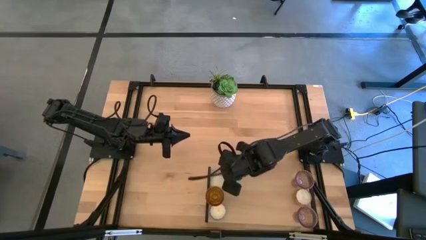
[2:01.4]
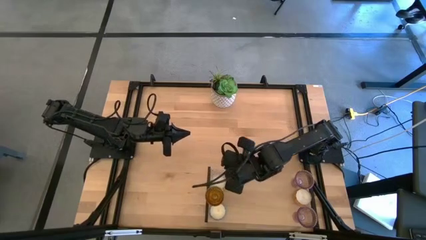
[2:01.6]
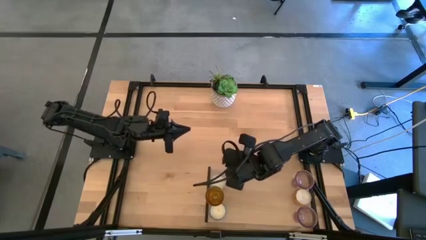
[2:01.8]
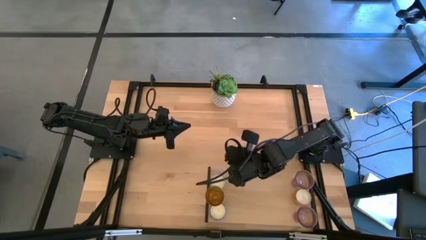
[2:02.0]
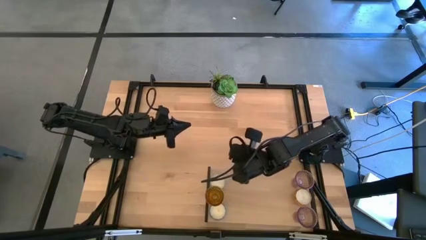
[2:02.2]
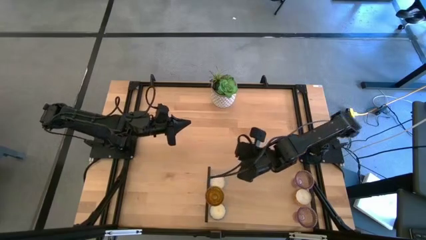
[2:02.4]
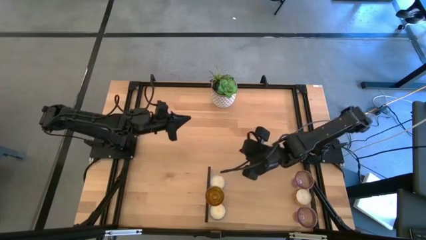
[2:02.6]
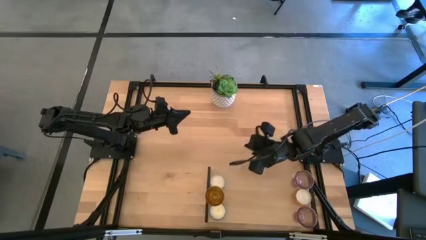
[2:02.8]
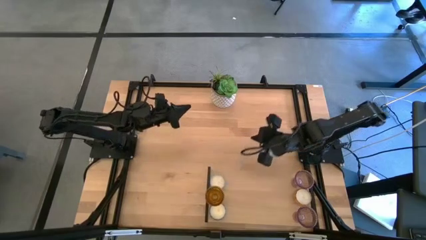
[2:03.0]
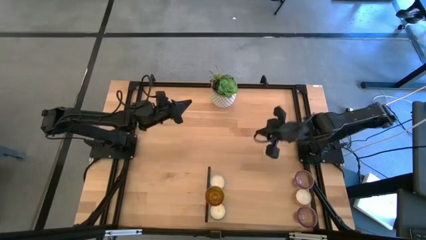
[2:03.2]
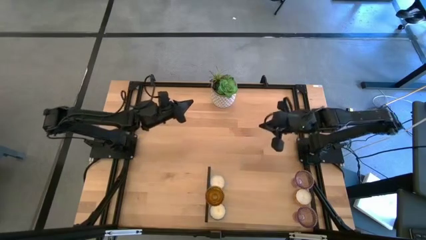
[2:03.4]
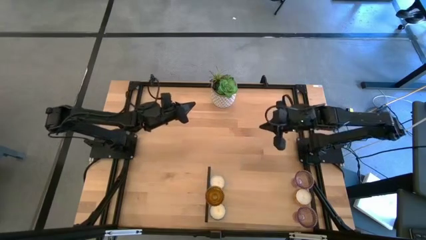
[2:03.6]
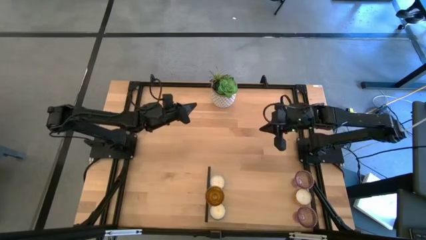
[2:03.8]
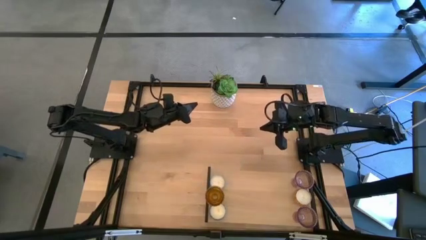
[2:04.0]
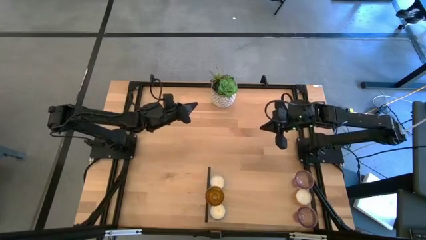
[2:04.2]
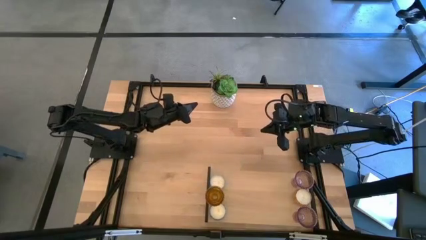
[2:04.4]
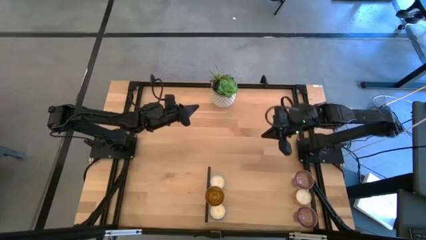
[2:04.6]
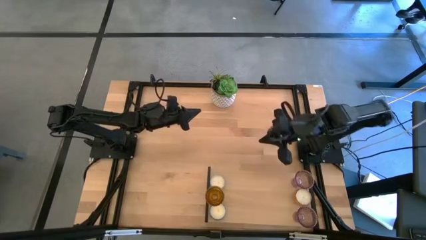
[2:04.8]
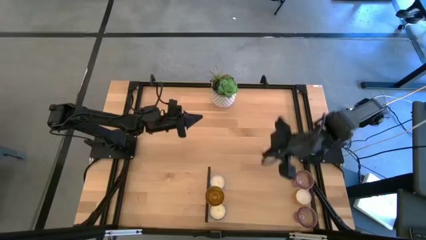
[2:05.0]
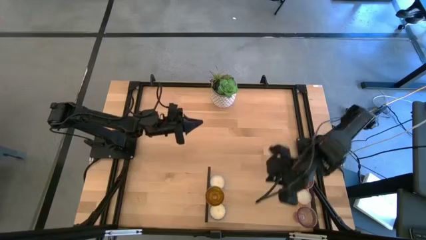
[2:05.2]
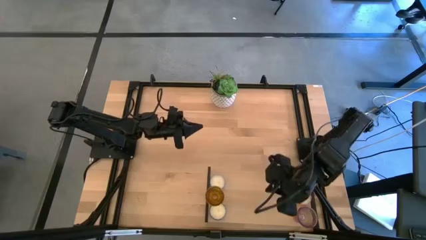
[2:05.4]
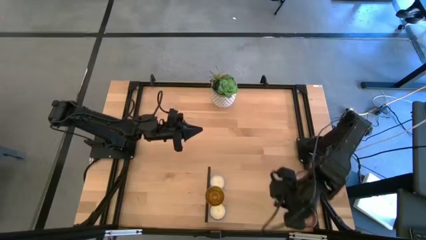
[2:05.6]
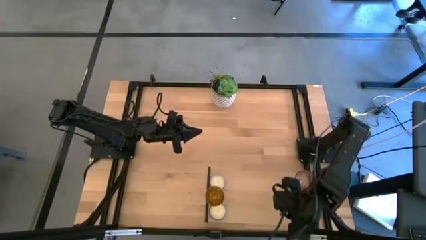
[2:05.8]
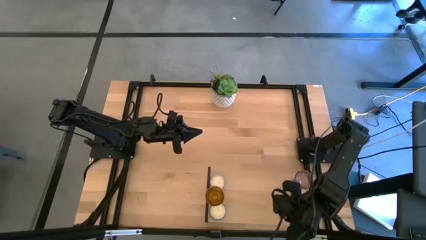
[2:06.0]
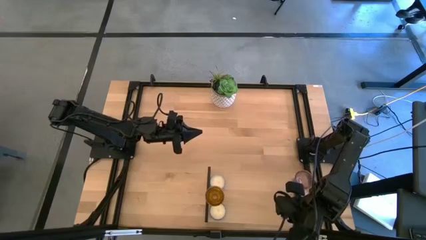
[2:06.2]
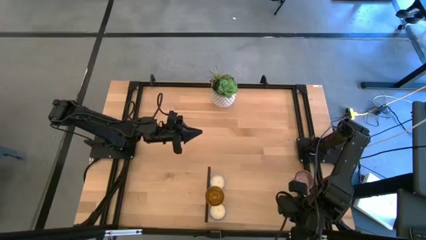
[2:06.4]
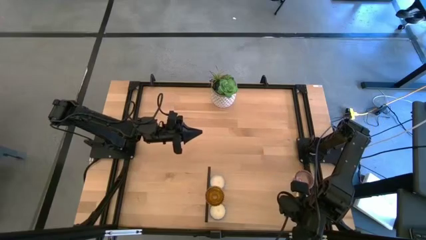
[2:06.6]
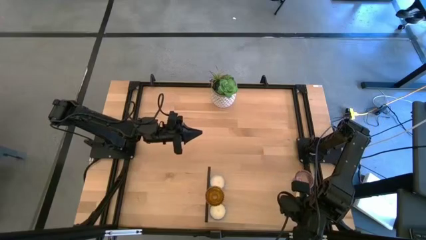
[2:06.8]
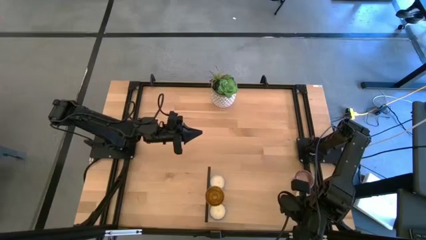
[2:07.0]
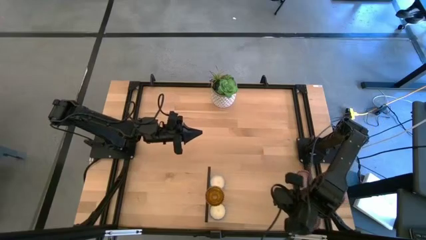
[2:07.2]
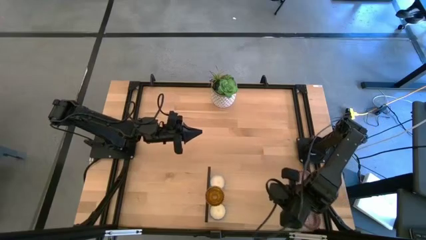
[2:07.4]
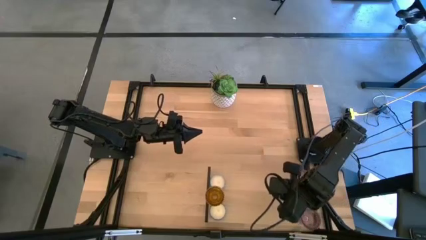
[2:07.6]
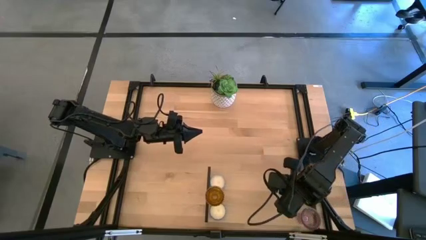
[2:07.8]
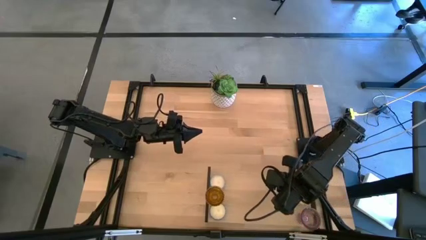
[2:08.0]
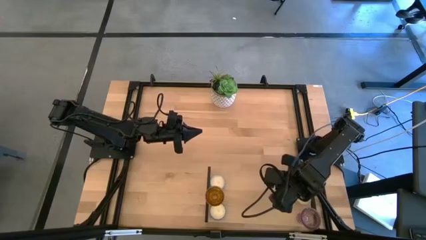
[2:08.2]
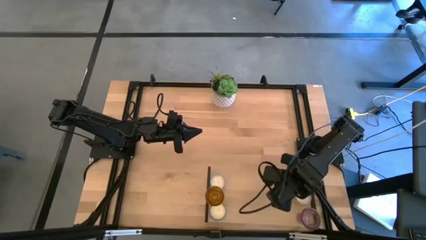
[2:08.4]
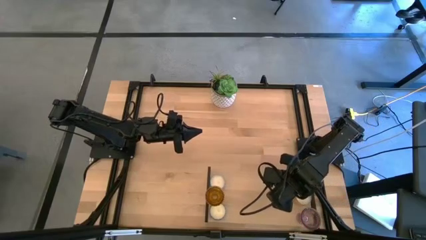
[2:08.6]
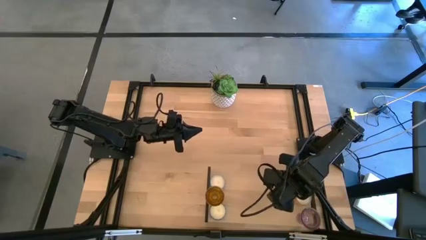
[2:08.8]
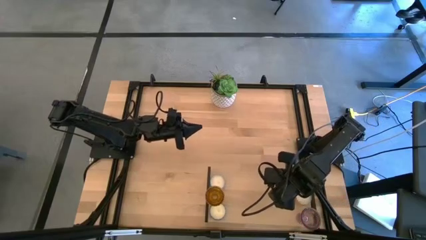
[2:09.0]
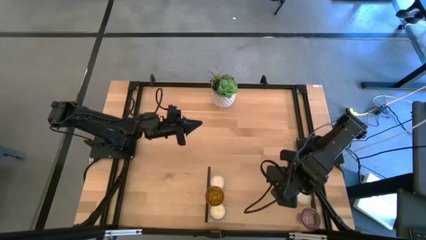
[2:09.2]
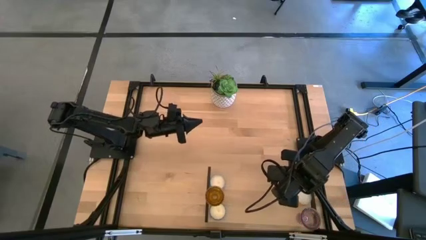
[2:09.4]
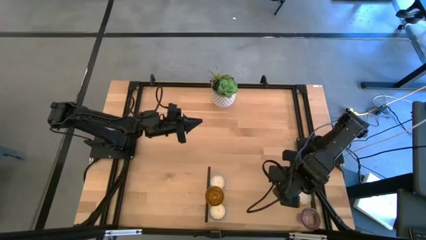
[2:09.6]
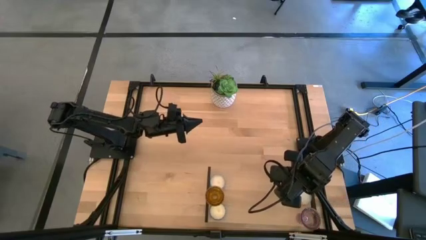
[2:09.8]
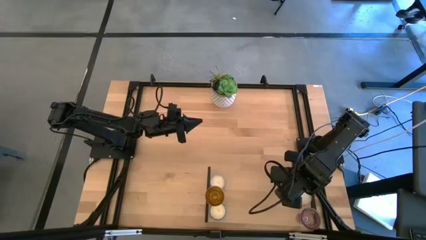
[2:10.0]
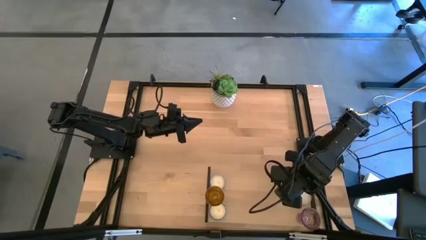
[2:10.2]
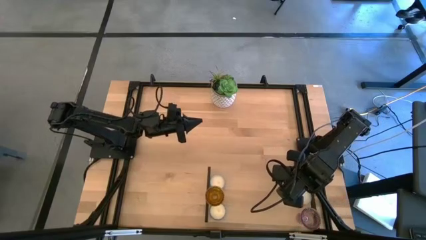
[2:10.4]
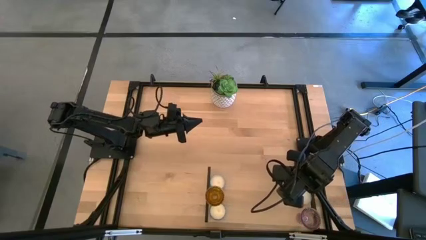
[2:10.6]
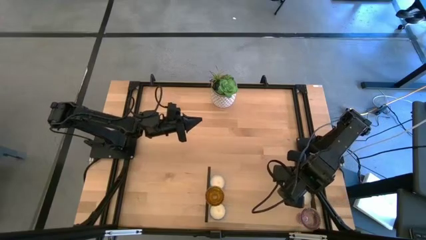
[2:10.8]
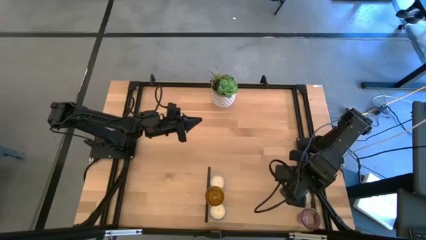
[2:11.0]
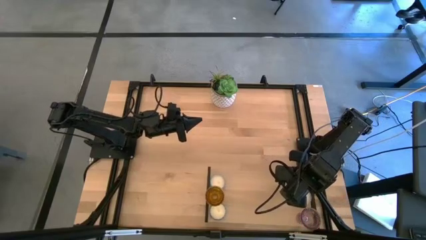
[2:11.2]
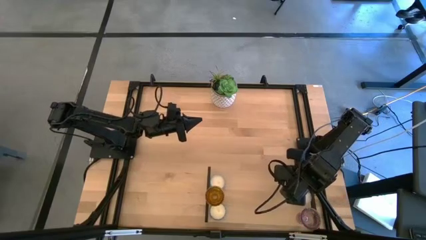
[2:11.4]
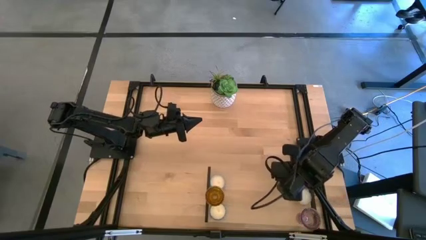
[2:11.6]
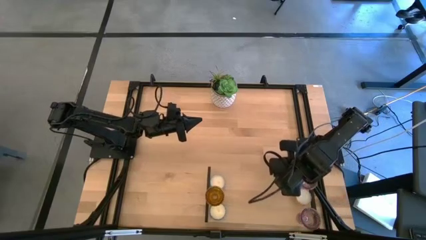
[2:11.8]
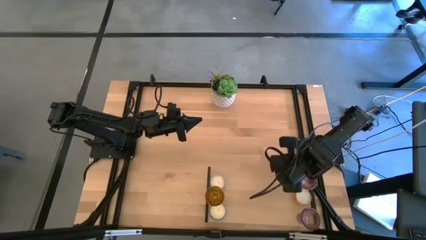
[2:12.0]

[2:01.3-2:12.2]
Task: Pick & Place candle stick holders
Adjust the purple glass candle holders on the shelf

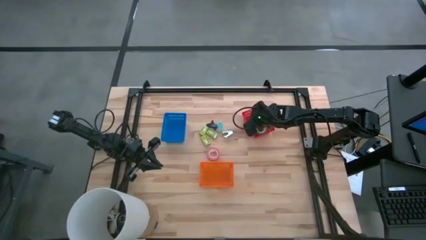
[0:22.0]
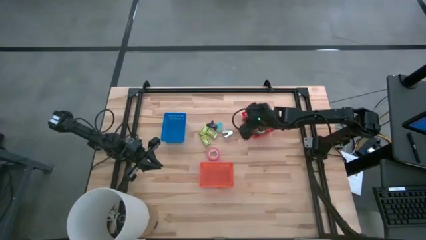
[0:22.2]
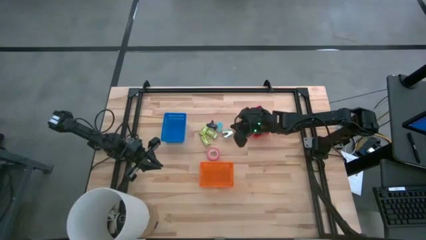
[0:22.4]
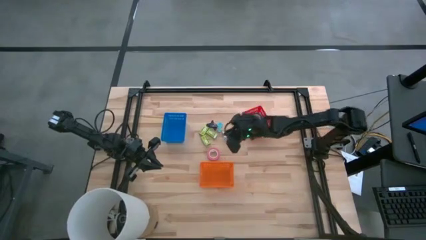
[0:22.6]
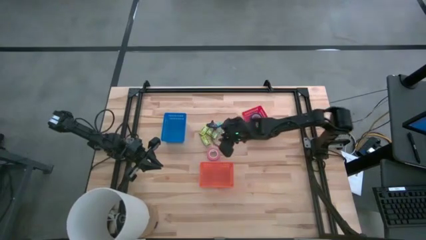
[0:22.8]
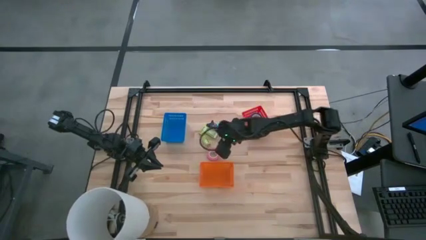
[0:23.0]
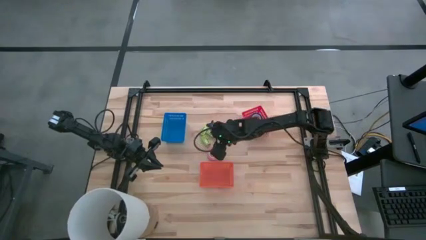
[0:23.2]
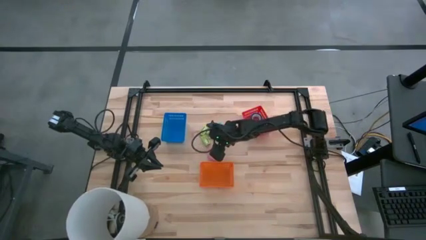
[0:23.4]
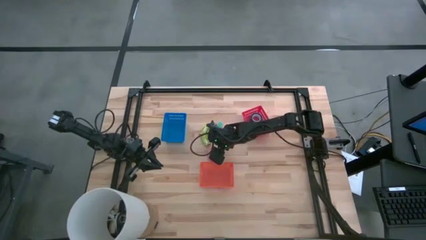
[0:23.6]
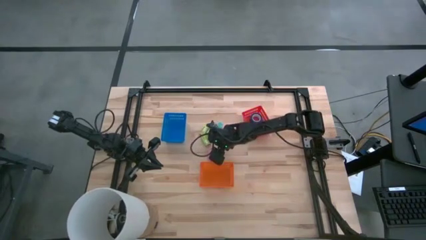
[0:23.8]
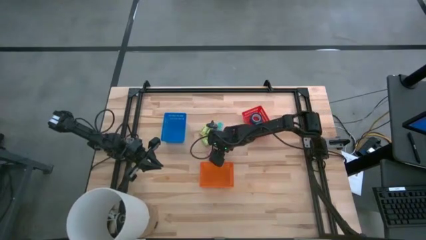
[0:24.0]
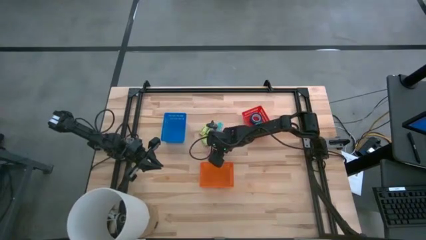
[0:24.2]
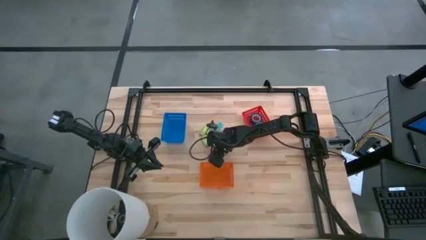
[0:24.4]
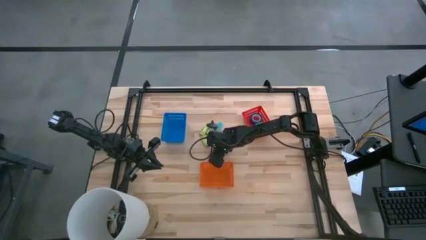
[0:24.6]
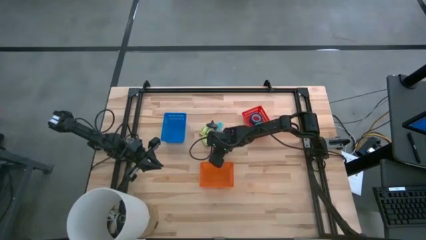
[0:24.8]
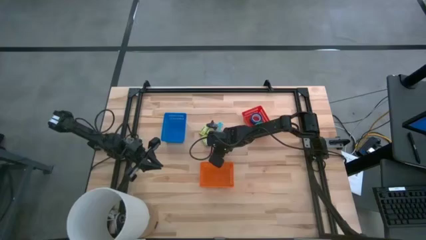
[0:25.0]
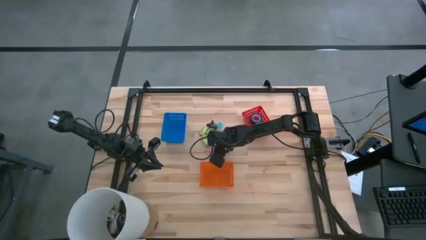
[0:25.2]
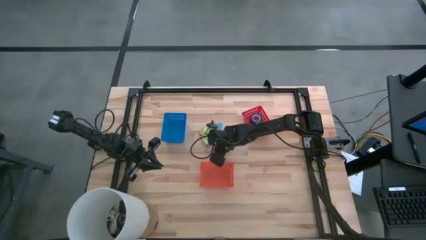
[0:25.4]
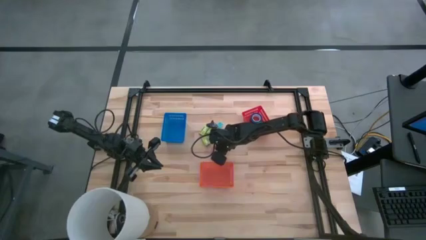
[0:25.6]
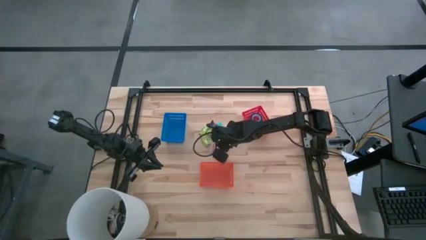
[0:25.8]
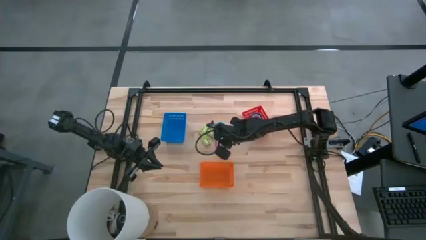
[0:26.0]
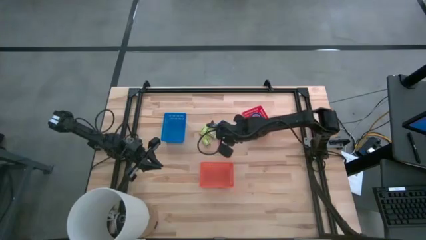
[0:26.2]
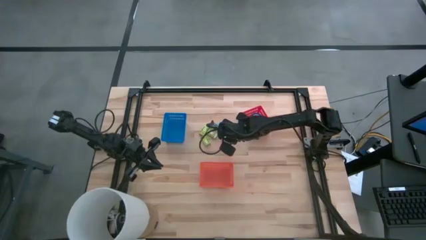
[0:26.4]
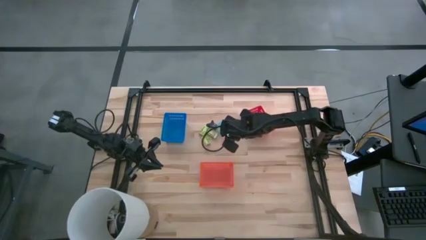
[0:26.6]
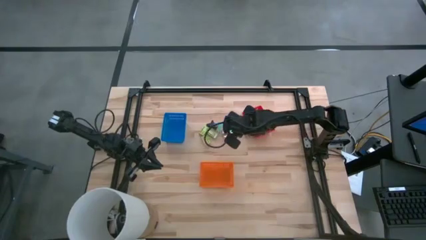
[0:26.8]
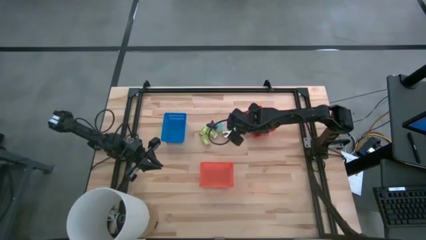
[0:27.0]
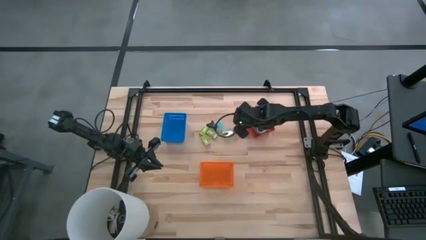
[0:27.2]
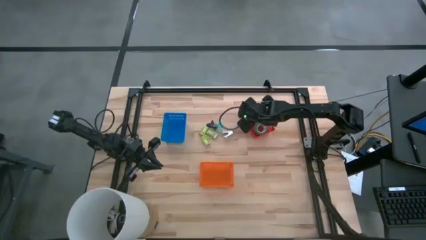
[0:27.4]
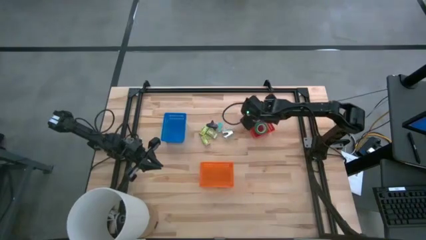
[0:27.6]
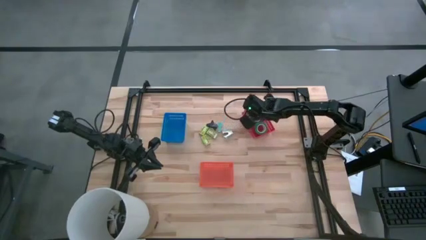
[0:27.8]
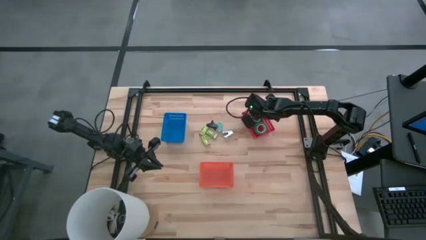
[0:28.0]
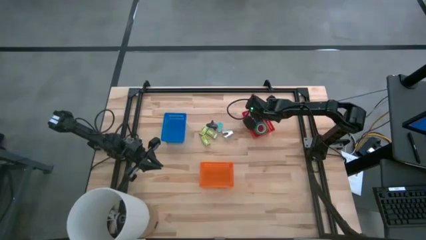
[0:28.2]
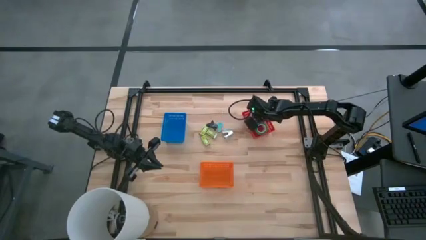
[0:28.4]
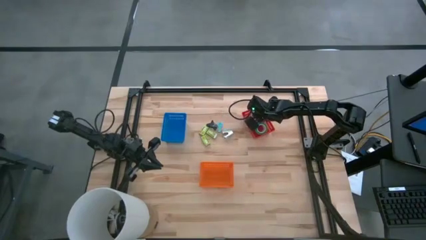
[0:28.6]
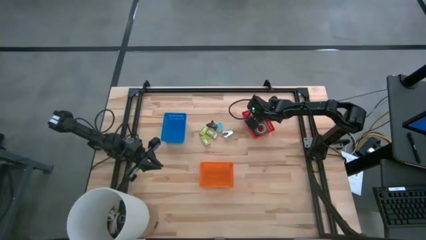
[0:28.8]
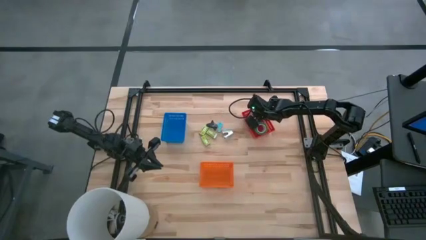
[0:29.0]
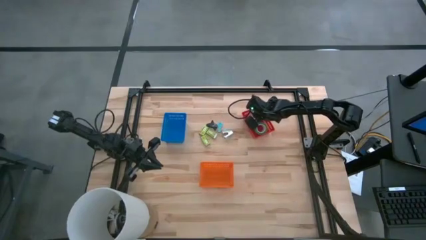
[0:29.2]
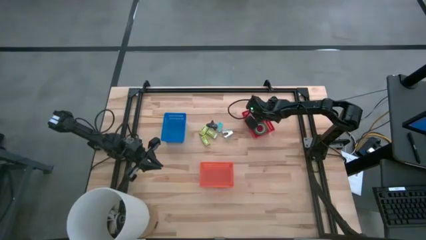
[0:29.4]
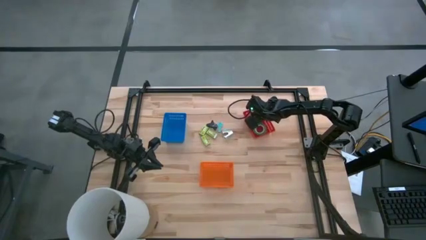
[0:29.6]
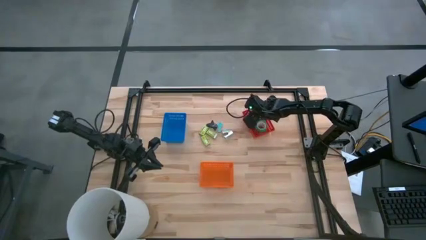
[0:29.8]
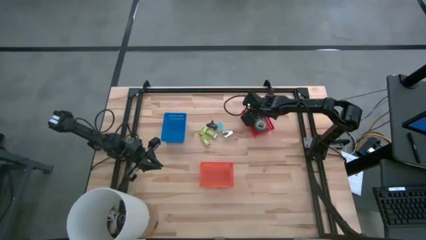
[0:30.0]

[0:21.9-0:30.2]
Task: Pick and place Stapler, Stapler remover, tape
Put the pink tape into the red basket
